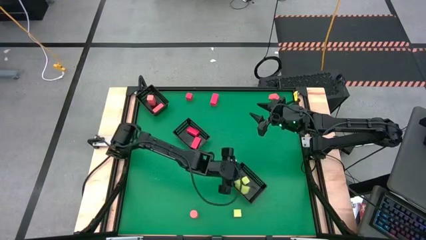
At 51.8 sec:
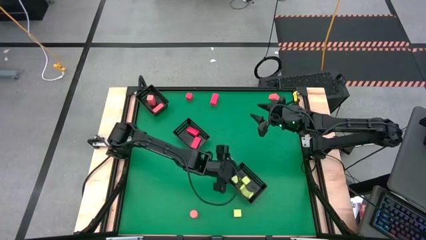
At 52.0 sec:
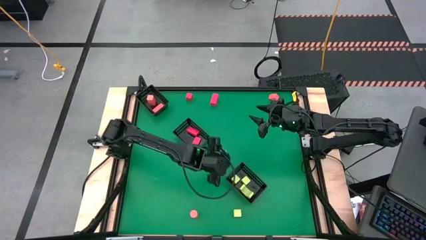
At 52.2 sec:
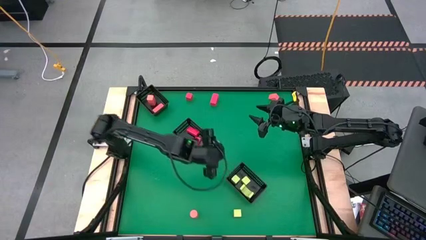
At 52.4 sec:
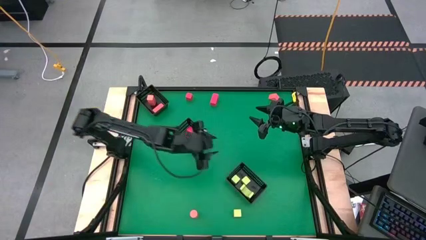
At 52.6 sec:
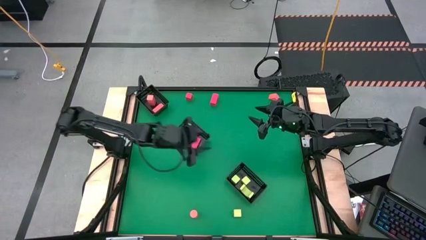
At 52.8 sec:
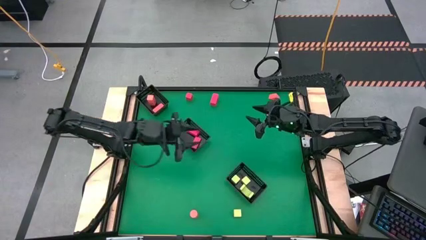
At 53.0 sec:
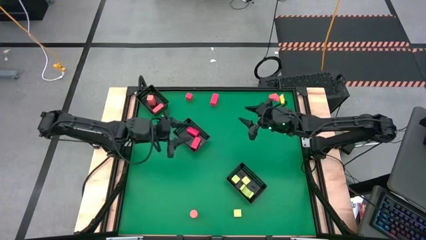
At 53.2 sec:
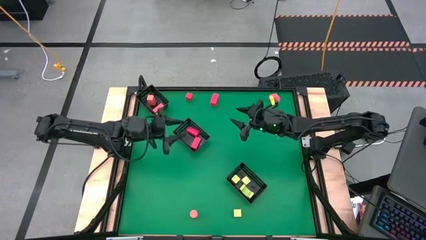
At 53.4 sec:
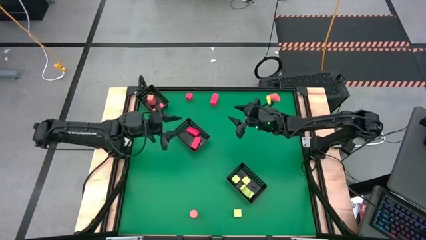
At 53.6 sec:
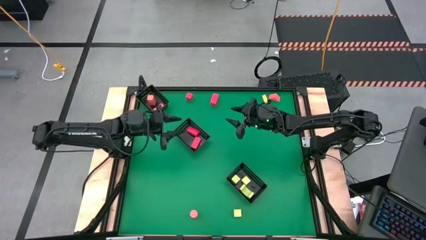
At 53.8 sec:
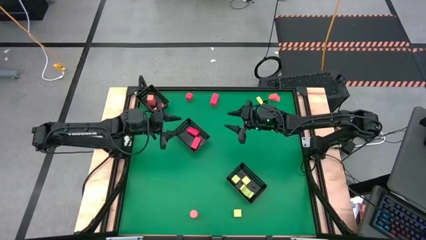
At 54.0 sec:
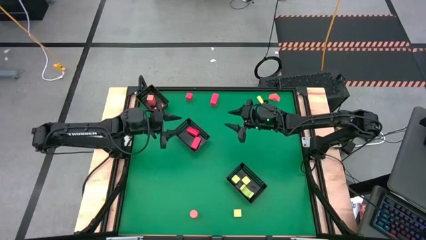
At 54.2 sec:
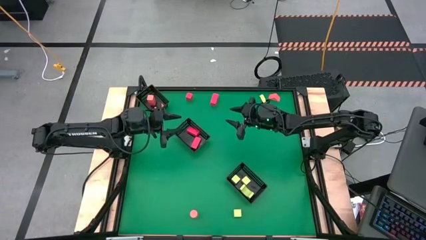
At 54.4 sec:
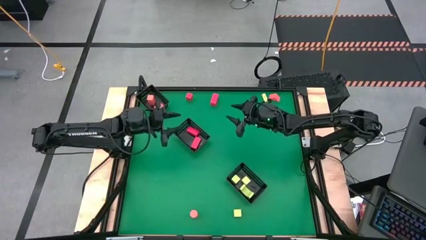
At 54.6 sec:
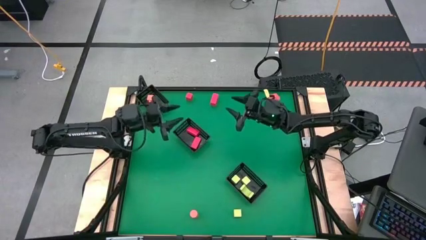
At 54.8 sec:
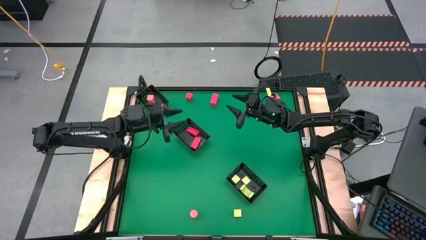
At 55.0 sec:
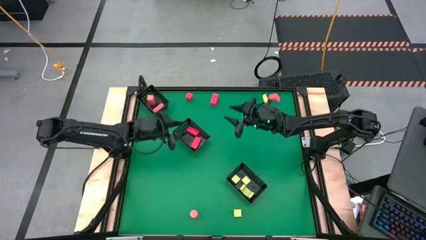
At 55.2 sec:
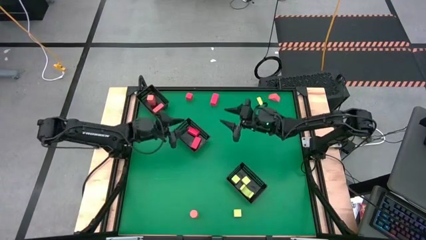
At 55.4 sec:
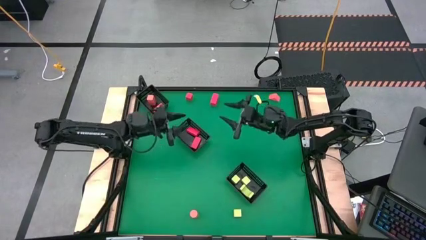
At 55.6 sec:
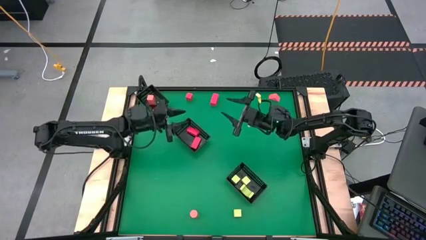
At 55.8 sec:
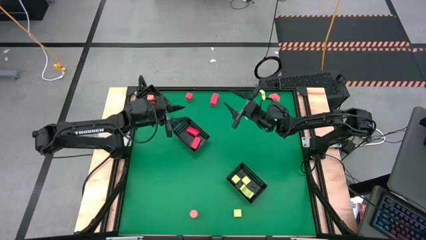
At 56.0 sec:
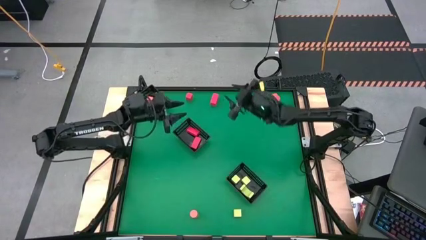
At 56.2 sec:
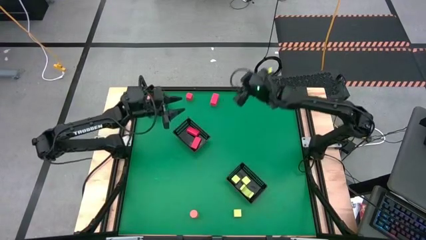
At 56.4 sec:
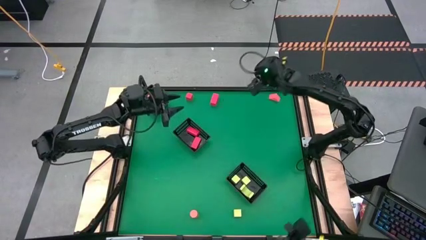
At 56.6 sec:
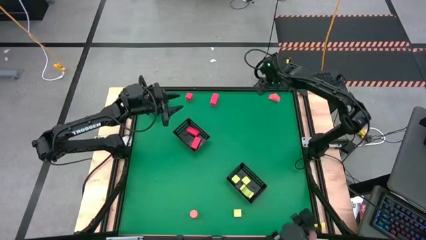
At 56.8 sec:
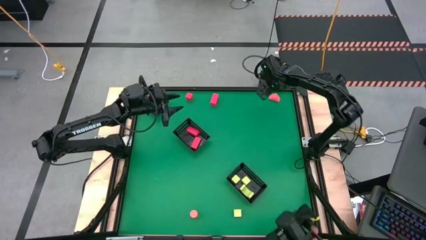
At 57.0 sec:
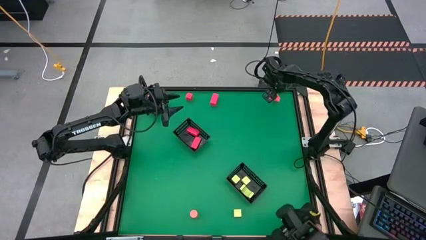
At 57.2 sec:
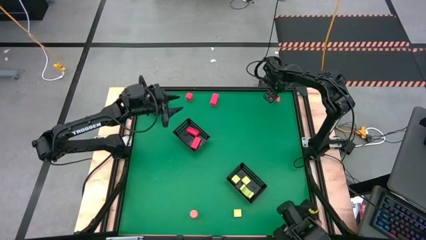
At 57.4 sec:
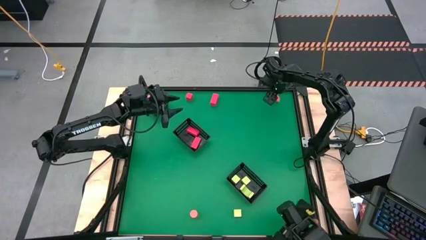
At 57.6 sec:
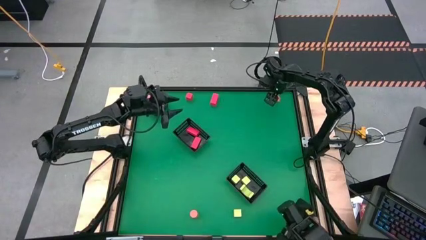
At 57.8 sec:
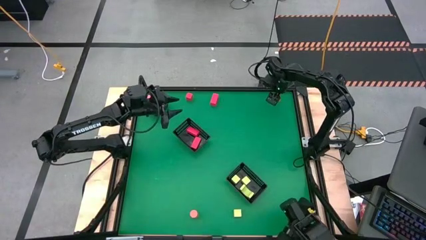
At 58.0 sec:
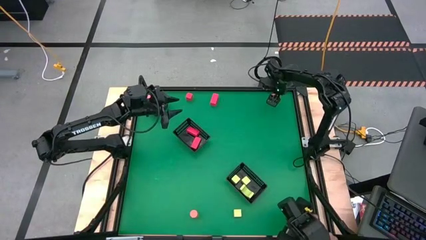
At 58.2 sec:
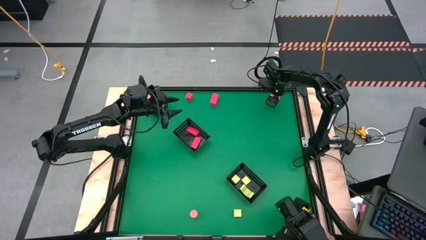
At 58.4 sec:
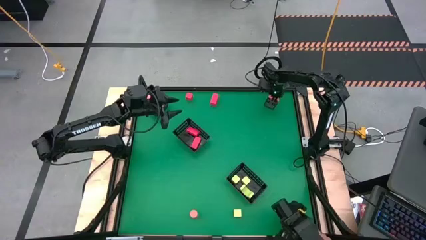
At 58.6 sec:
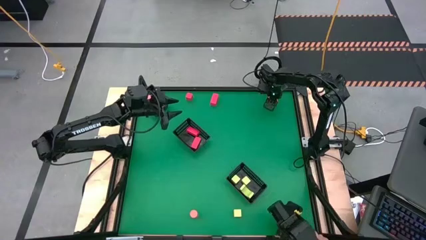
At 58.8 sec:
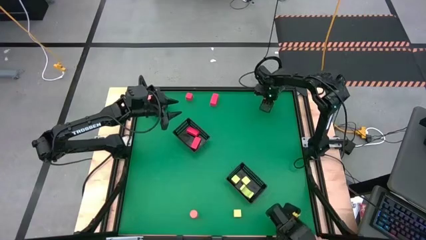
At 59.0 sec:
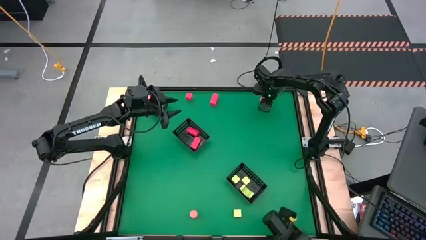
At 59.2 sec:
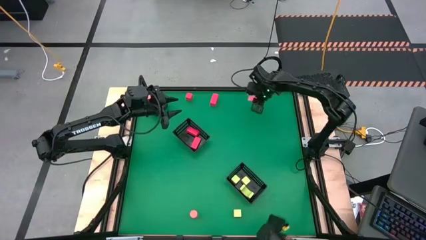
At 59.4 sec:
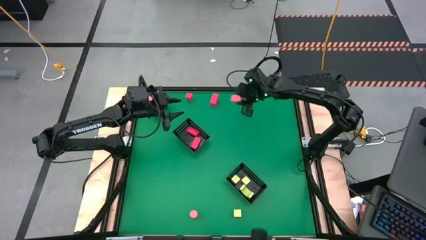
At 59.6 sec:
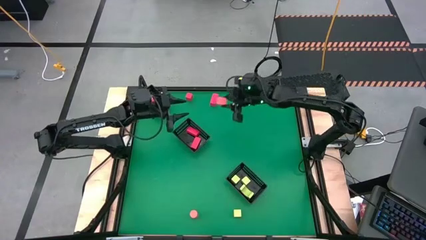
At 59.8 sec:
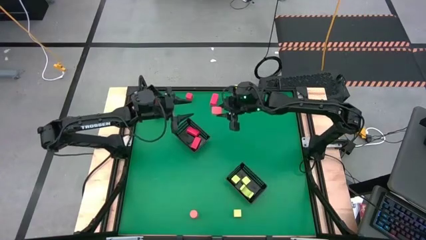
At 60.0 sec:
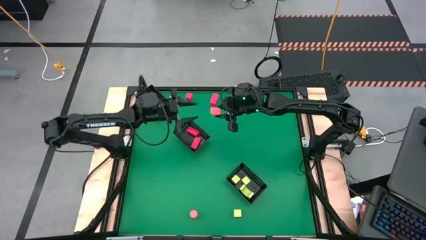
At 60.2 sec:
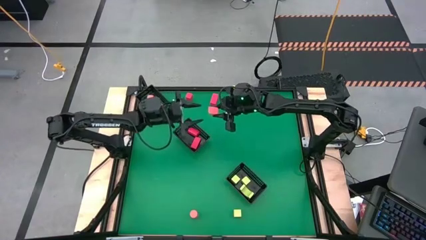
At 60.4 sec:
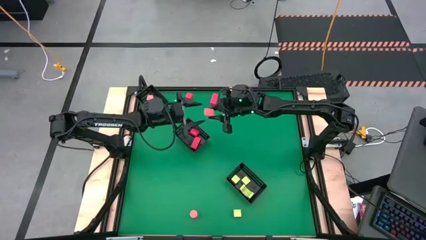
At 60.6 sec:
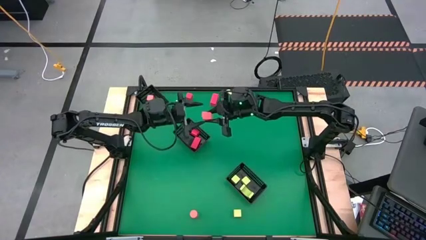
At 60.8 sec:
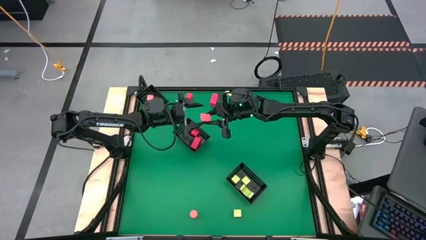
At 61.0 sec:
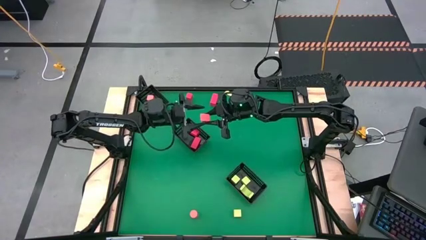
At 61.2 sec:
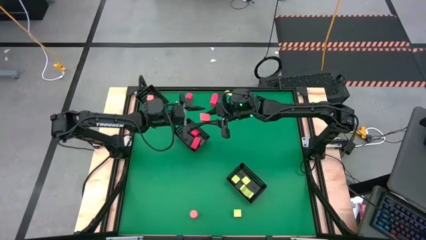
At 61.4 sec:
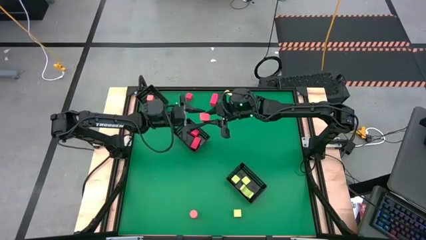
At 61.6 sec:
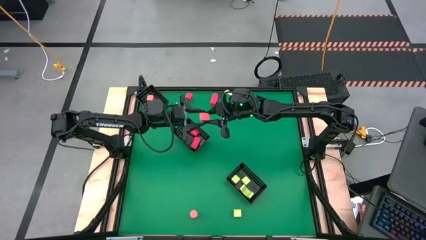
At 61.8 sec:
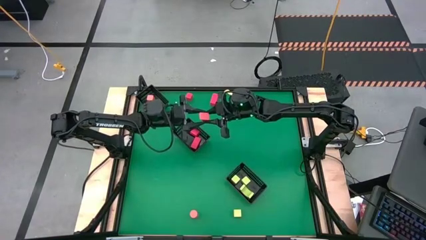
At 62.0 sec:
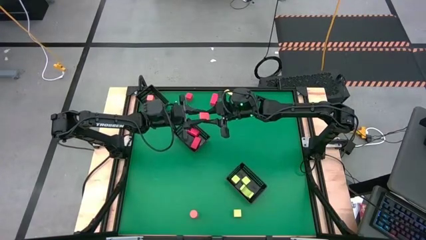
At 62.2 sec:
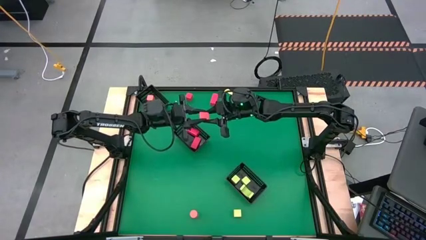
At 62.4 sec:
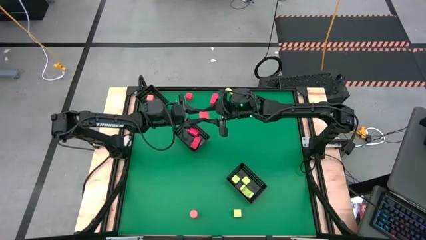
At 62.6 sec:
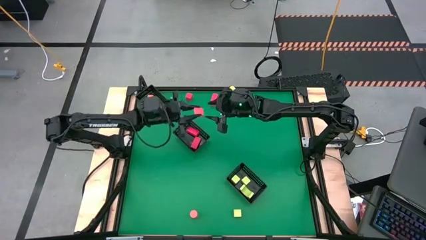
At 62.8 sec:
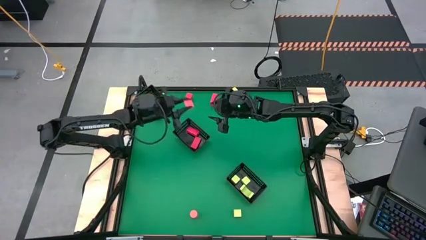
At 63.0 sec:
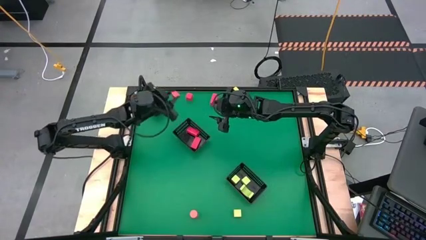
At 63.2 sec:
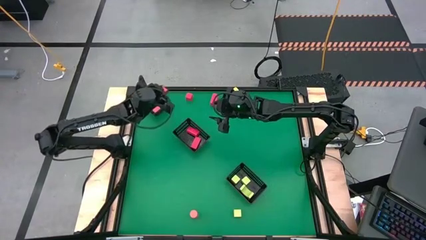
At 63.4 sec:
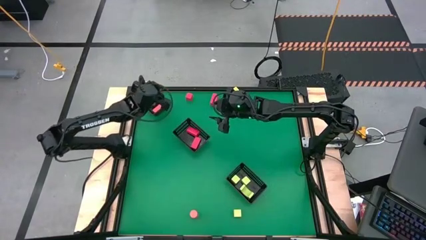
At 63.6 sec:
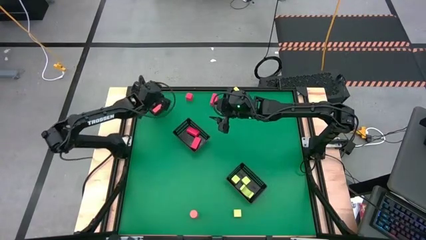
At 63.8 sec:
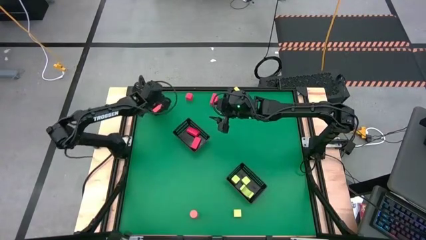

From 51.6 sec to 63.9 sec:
Task: Sort & place blocks by color
Put the light orange block into the top black bin

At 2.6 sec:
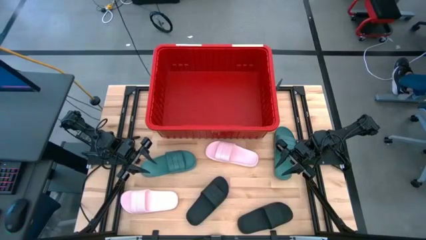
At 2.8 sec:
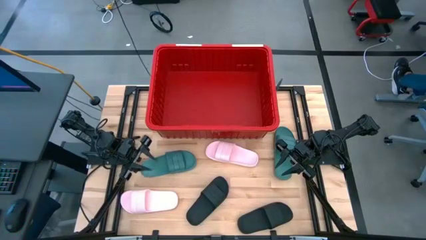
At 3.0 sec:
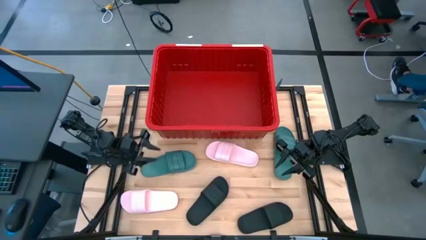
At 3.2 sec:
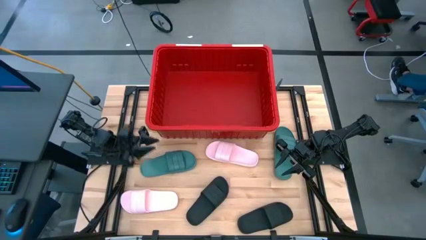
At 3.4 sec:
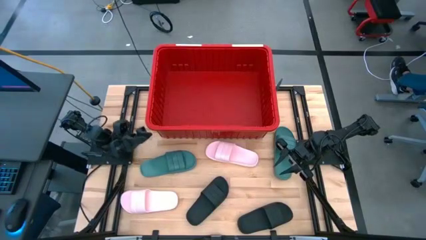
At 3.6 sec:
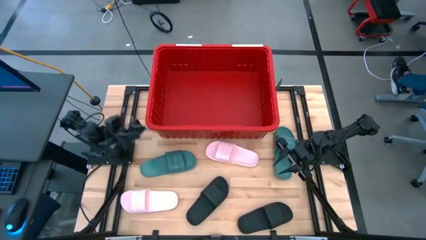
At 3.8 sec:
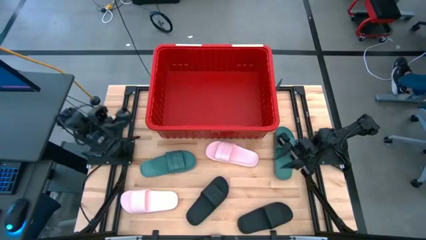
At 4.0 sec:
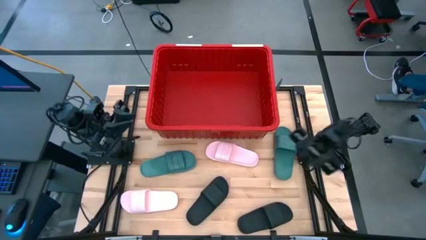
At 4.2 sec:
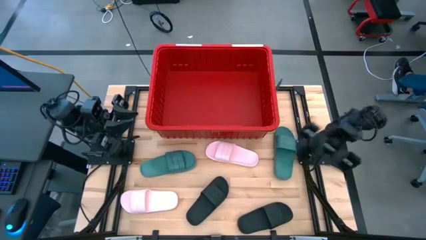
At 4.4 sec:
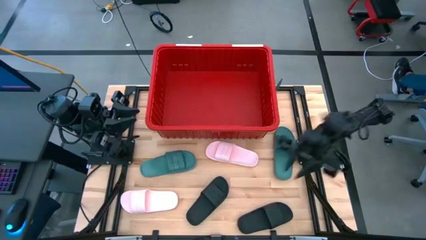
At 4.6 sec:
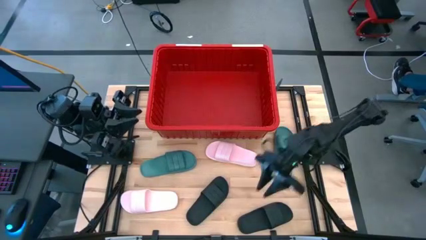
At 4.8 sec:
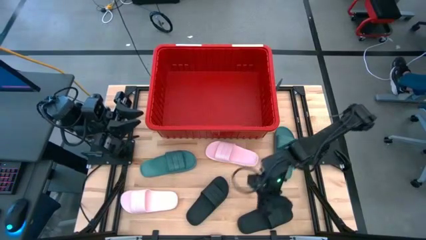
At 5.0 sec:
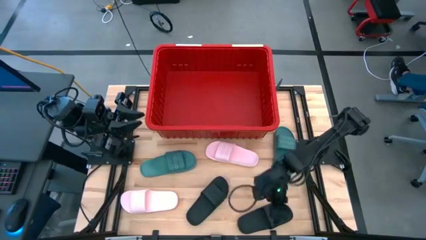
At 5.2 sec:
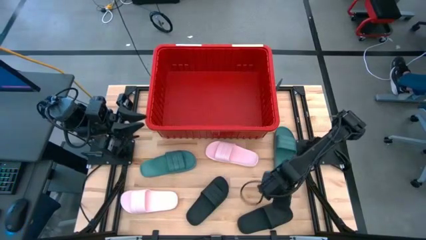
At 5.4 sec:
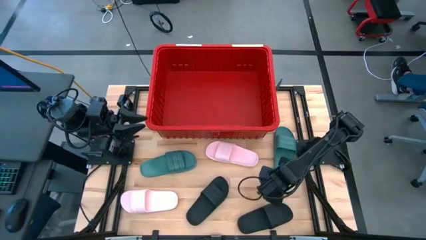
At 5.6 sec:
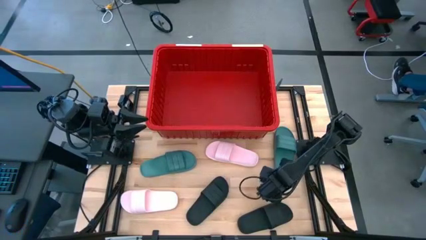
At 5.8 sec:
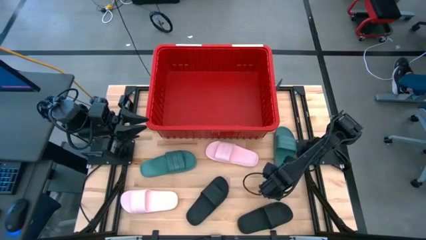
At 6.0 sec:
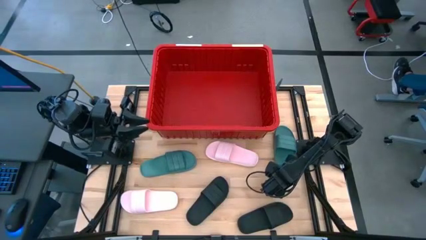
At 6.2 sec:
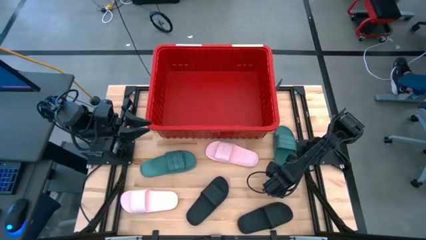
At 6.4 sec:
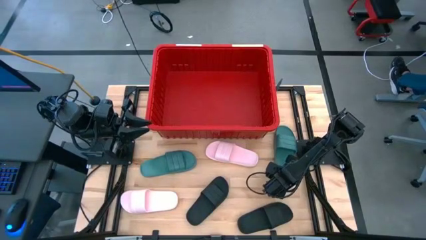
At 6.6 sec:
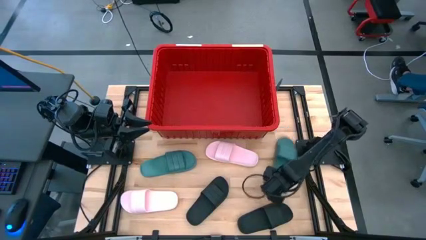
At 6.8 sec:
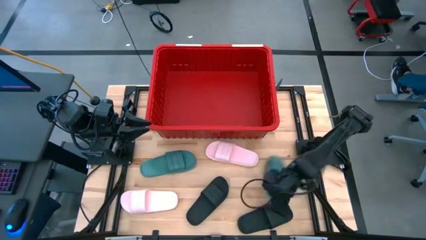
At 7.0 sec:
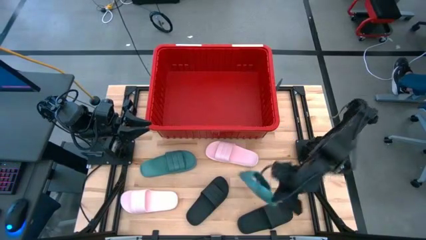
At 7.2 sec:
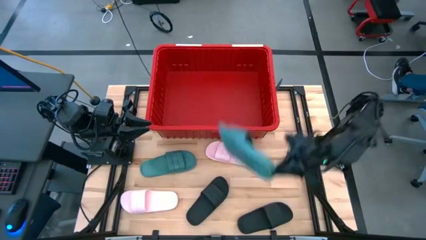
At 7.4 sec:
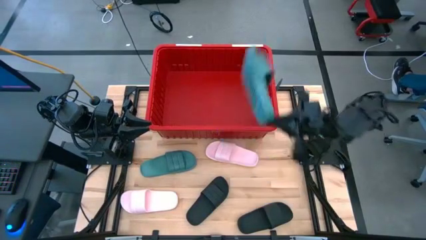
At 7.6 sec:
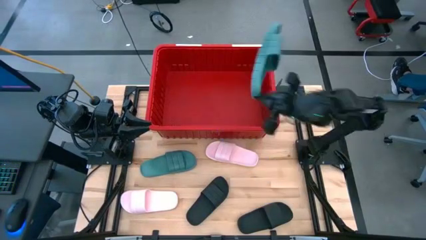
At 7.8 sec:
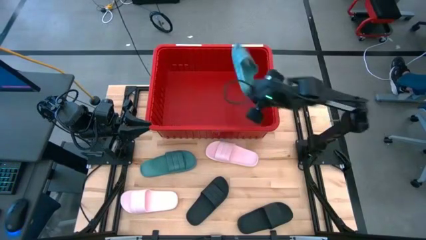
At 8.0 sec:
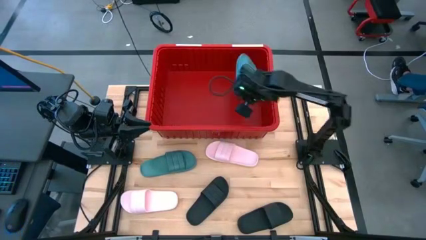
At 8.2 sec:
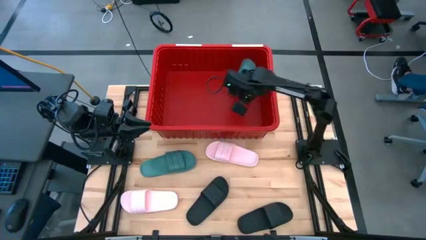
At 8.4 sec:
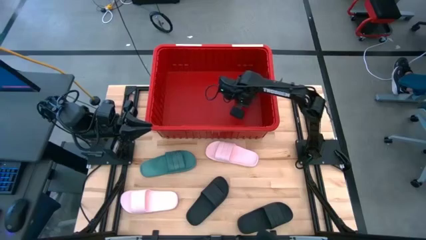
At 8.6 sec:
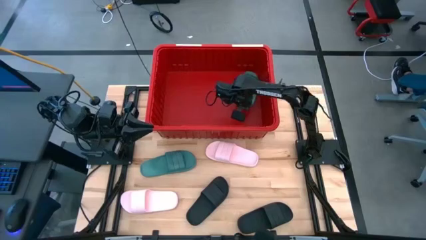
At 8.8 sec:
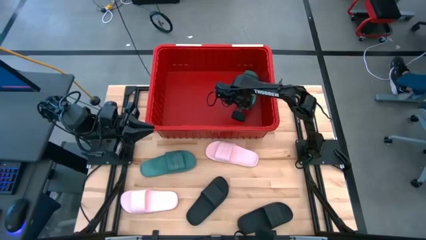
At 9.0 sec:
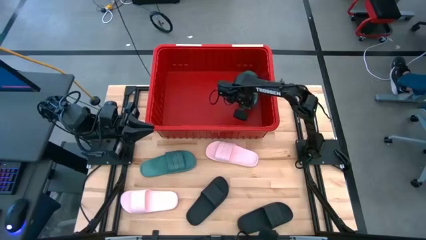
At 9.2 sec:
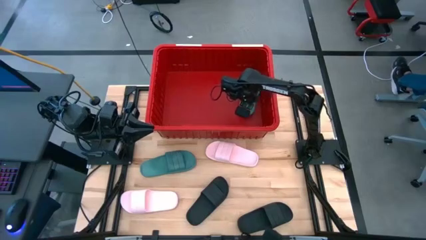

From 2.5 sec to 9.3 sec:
Task: Pick and place slides into bin
Put the right blue slide into the red bin
